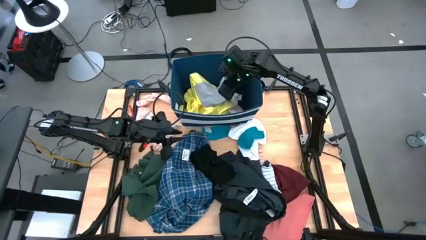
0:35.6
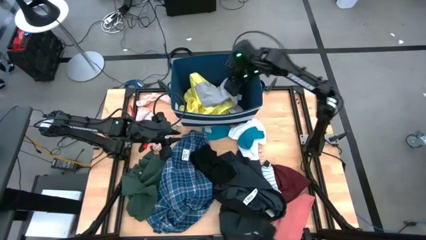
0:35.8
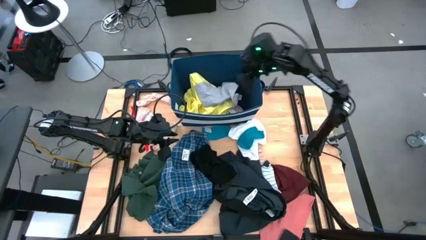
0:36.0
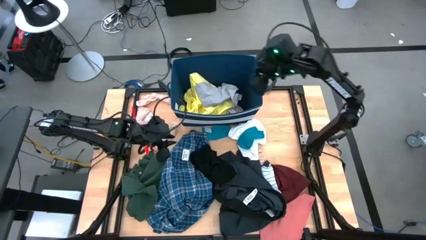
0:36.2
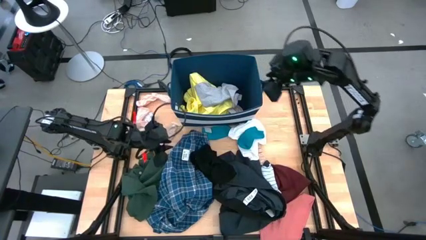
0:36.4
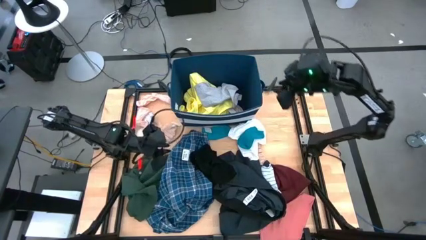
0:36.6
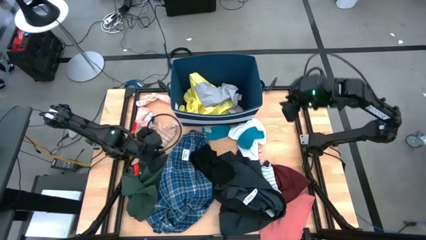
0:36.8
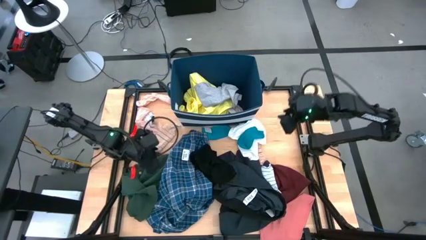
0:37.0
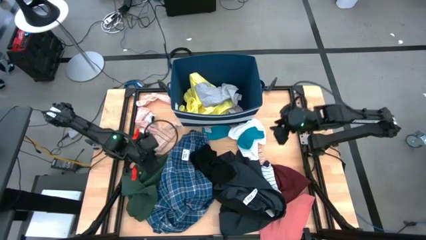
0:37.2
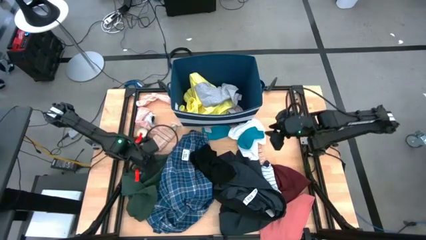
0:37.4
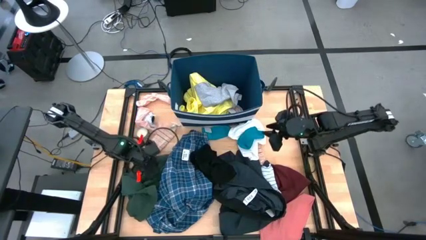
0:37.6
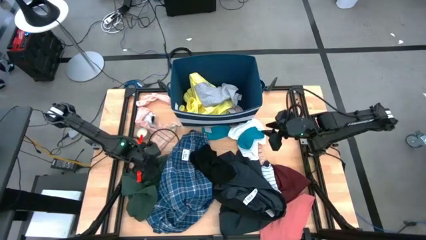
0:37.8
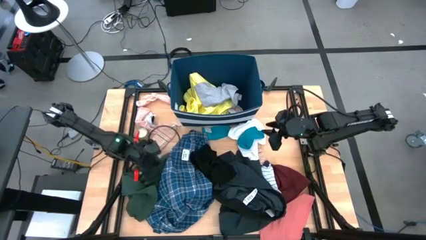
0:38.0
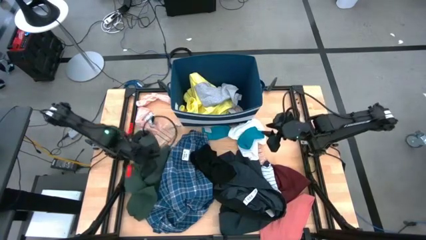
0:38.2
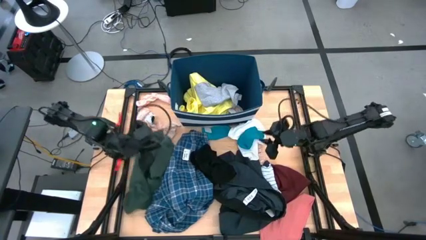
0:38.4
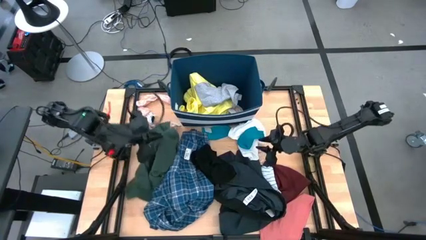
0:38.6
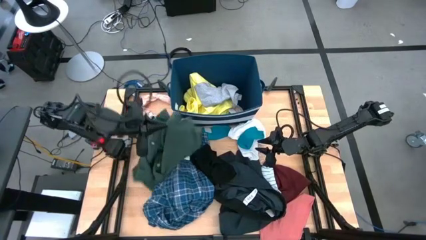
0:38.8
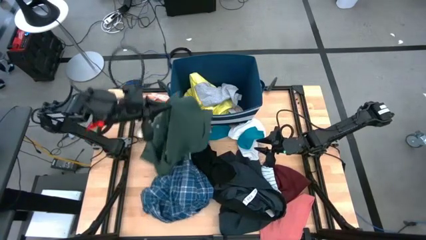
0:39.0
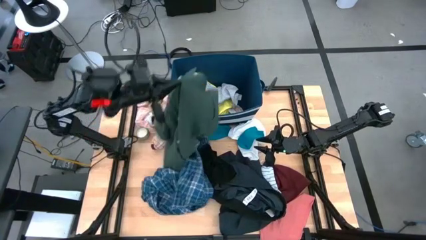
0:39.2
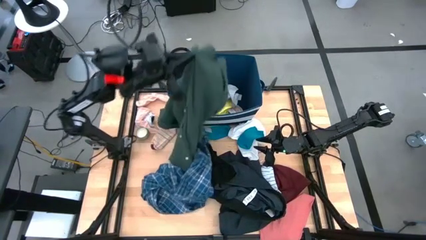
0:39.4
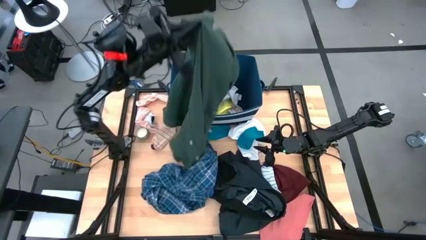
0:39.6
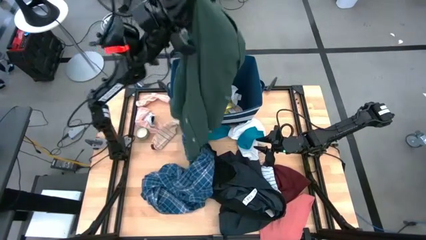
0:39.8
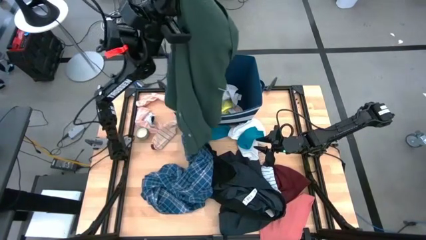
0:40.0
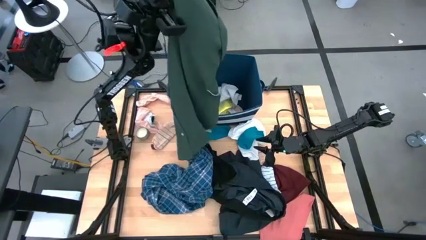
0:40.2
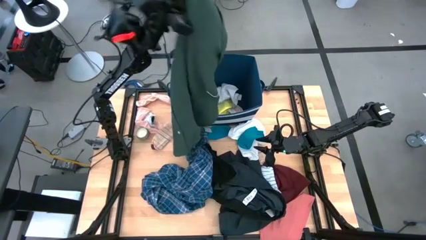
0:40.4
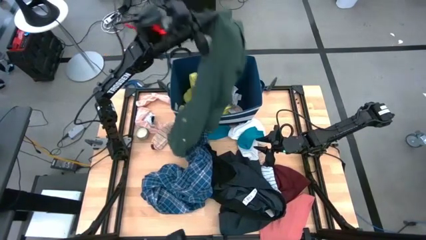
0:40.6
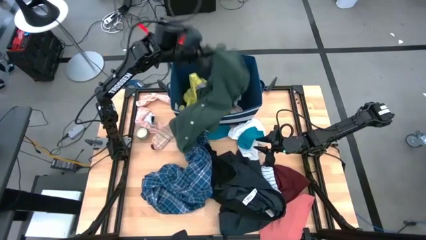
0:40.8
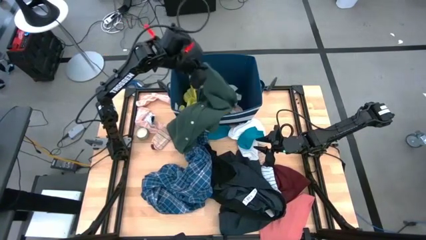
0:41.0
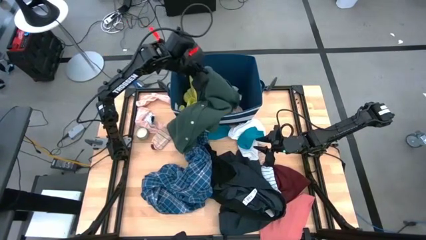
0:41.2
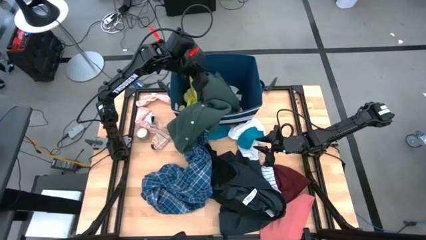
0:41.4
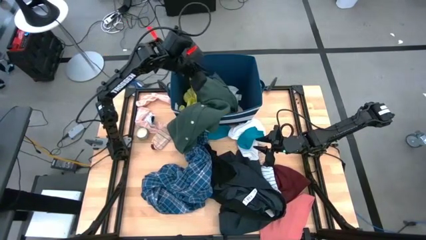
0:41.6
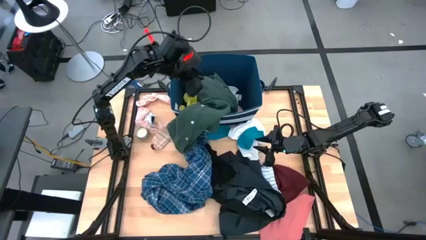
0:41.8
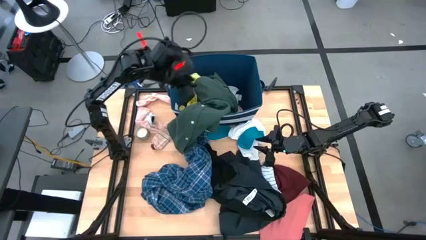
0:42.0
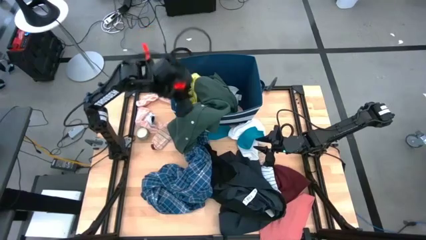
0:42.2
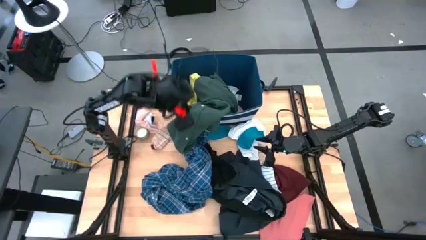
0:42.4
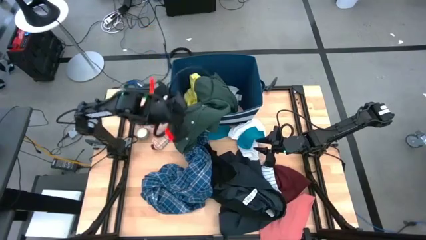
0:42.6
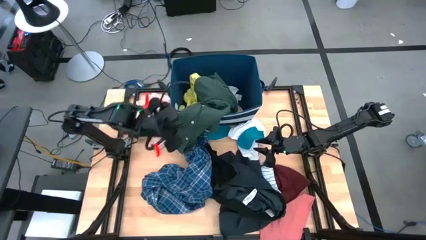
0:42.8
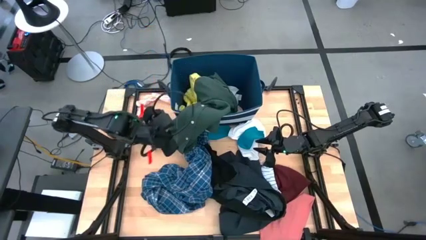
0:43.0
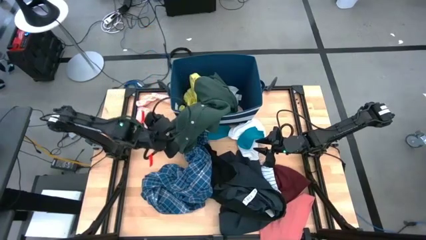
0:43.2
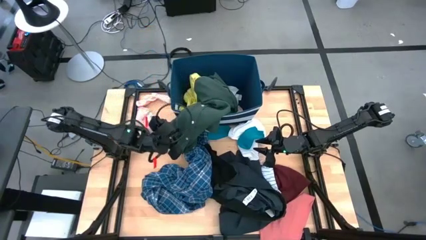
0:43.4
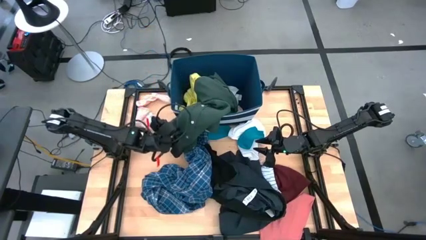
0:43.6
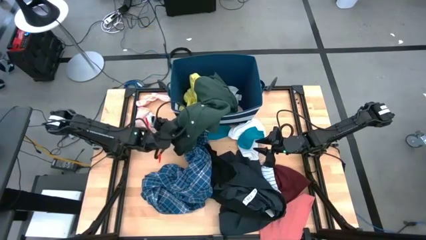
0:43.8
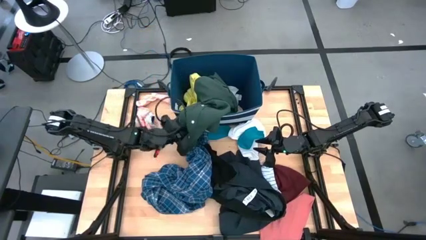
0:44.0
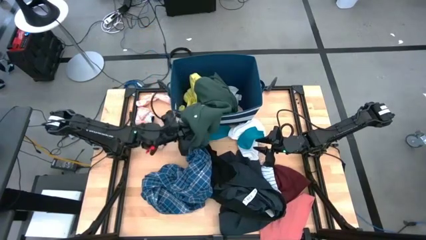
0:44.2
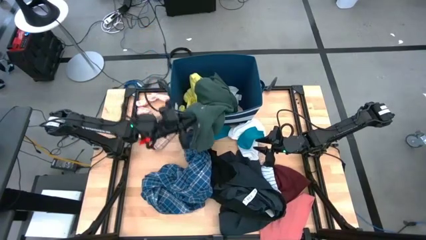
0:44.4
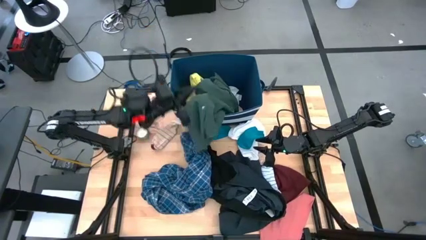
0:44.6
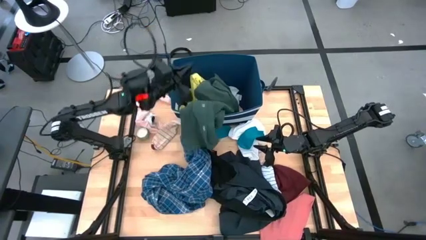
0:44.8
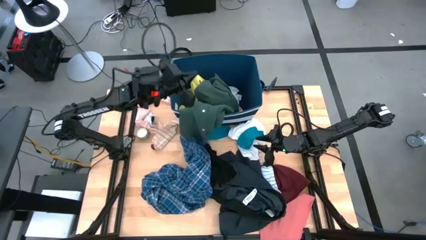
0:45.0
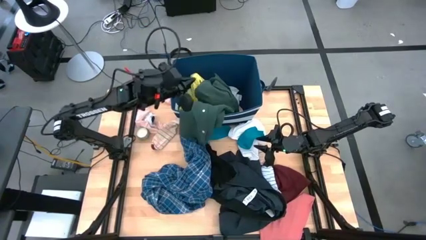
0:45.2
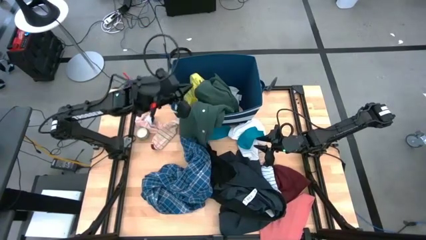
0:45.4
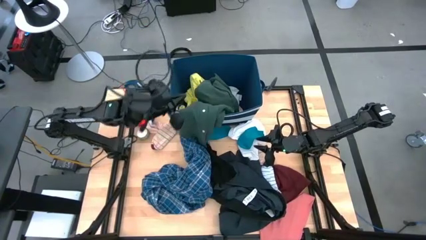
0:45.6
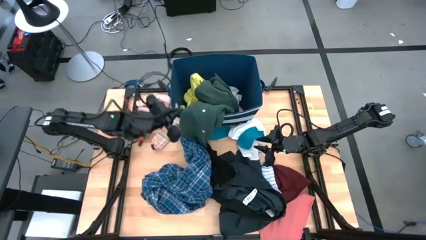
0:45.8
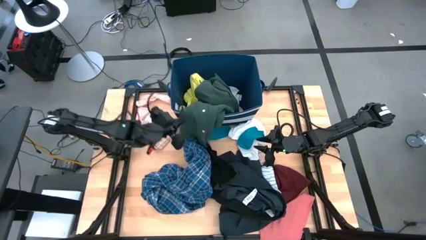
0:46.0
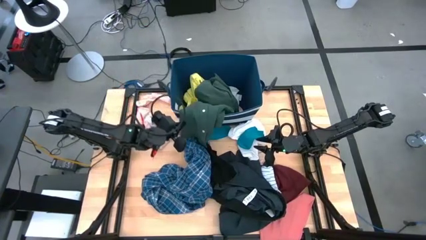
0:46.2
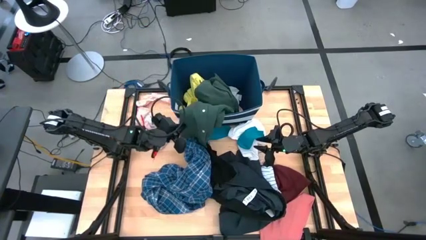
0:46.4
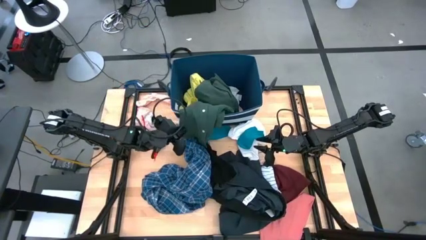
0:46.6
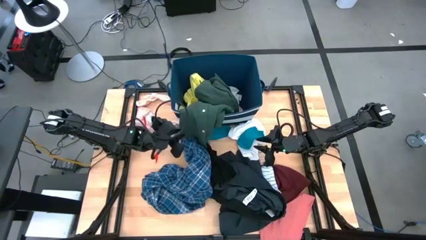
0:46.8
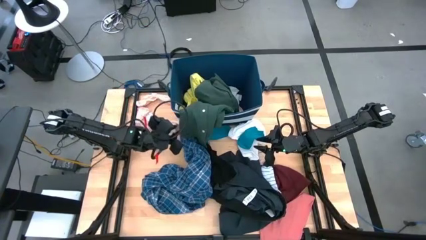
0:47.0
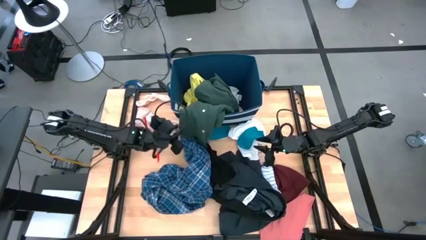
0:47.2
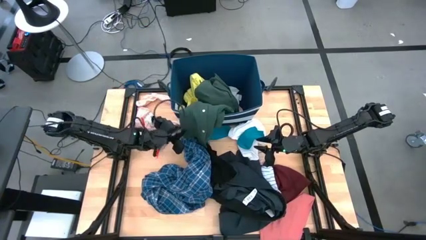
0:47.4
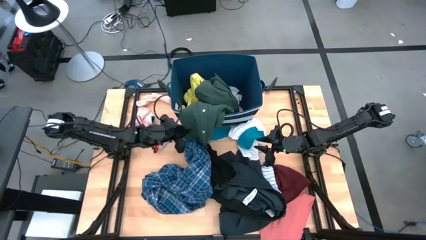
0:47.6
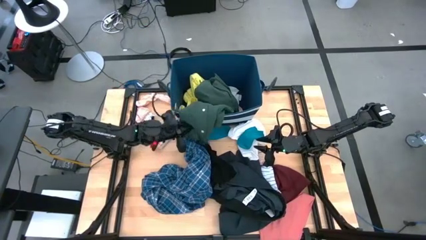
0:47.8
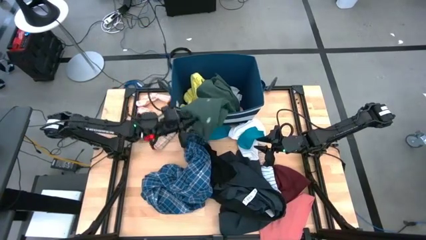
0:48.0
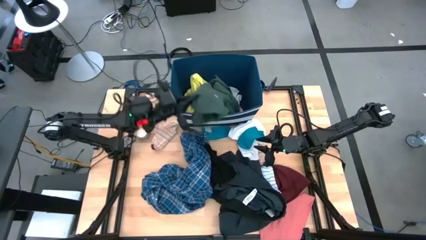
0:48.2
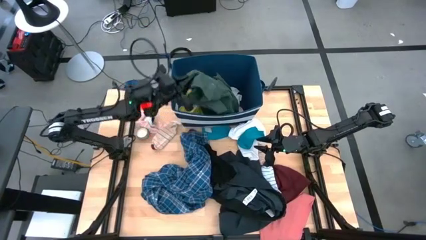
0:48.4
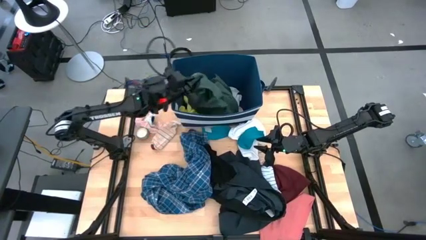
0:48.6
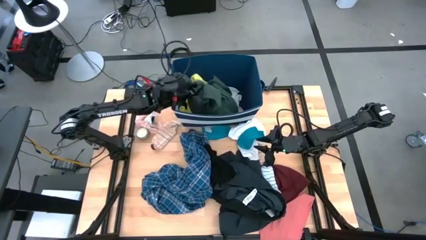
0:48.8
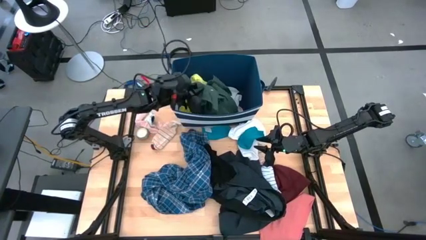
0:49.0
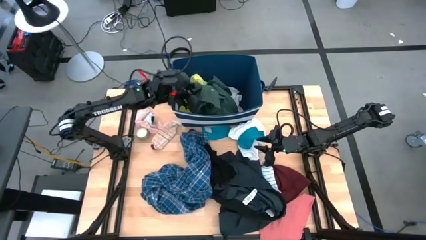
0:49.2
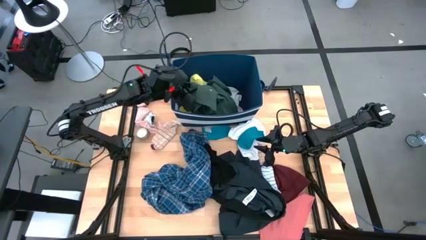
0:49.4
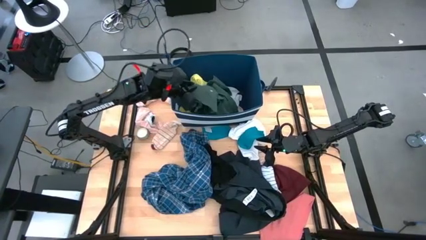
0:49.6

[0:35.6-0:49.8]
Task: Sort clothes
Put the green polo shirt in the laundry organizer

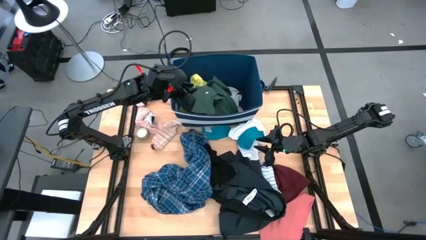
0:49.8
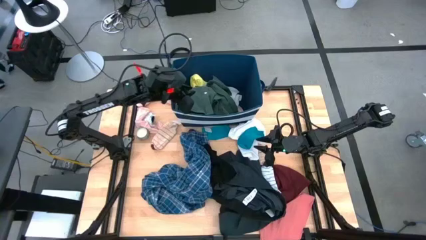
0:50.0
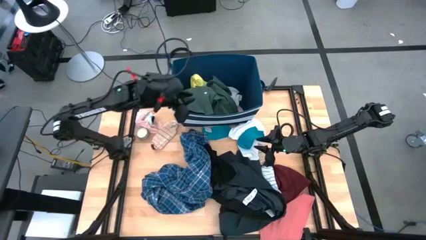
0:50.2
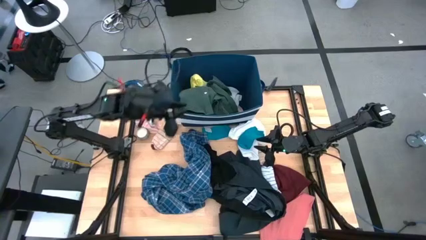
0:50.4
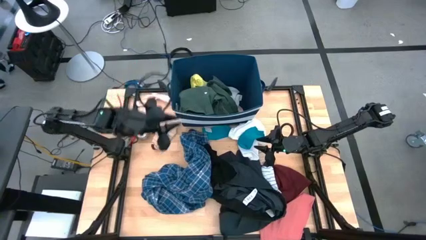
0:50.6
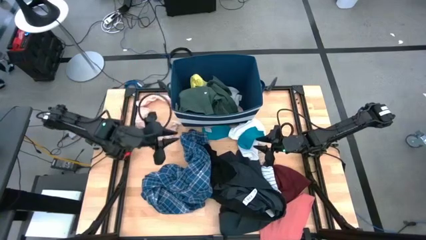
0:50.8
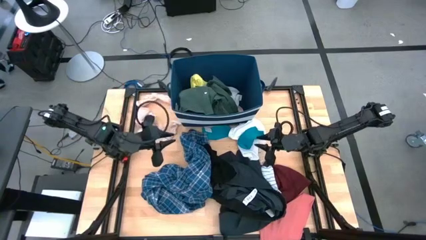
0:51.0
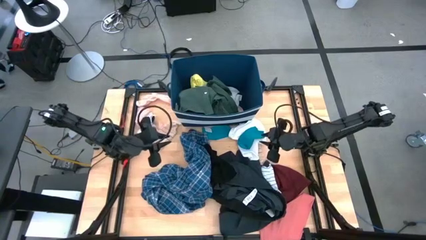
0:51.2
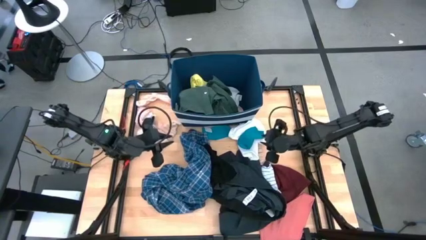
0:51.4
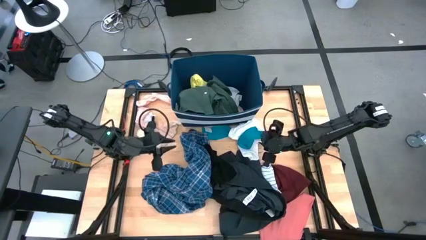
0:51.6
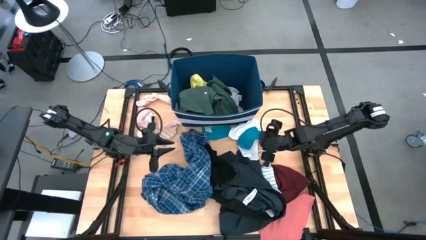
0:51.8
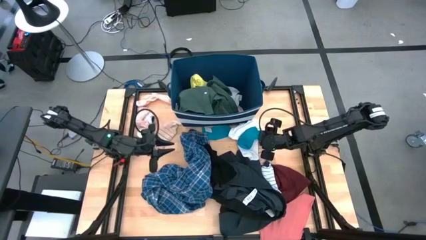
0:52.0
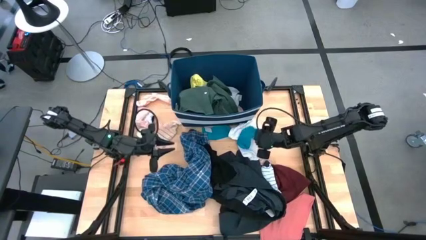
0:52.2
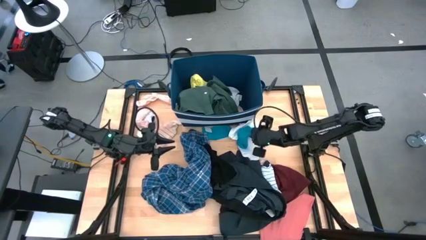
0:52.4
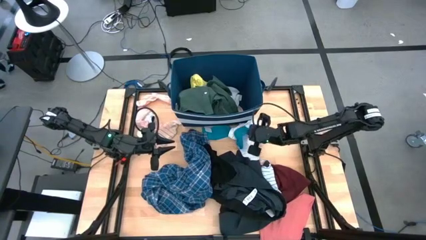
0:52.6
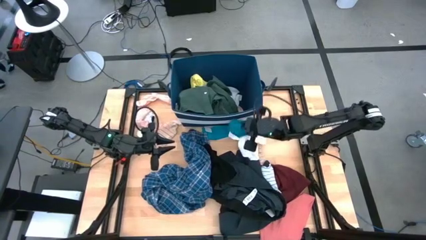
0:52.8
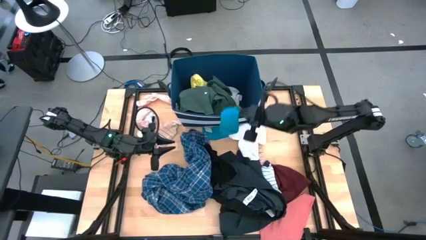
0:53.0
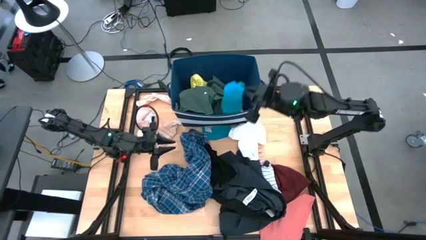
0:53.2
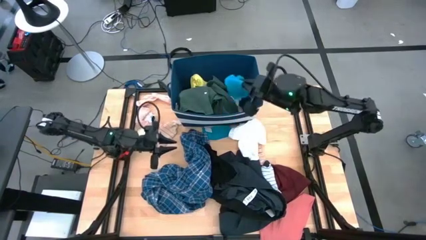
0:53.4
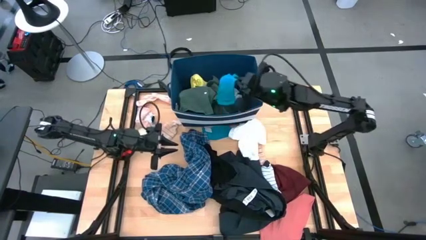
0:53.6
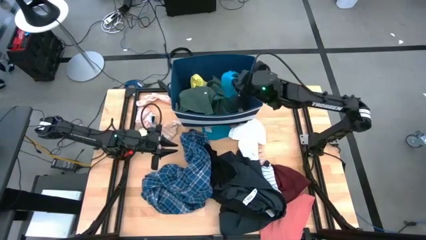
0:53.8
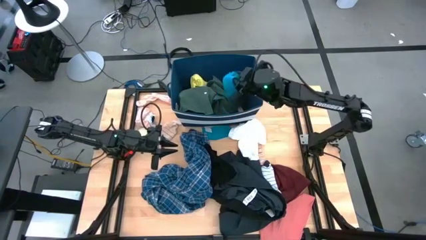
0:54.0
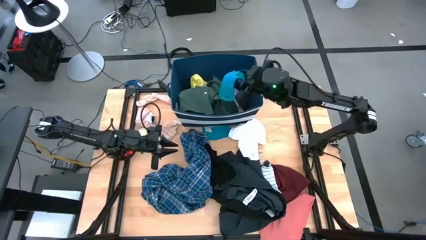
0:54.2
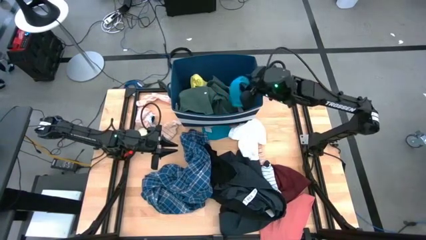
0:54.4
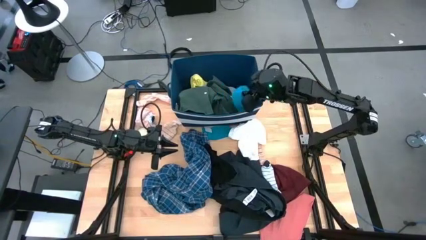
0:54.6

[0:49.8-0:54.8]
Put the blue sock into the laundry organizer
